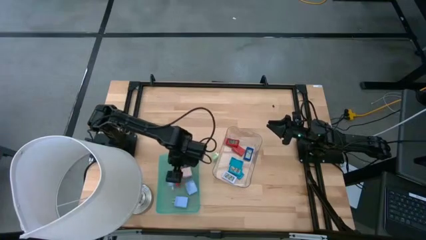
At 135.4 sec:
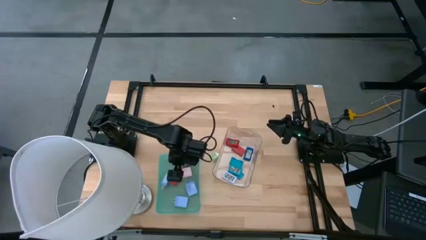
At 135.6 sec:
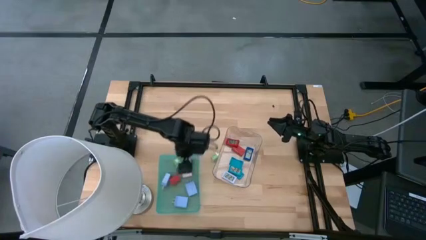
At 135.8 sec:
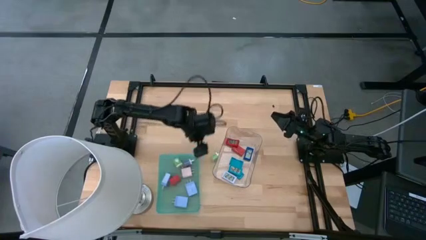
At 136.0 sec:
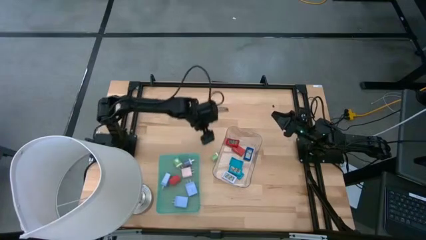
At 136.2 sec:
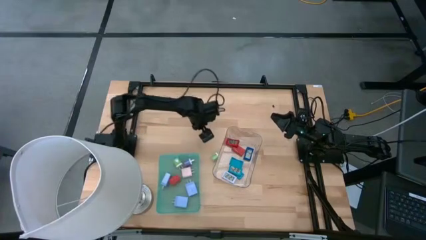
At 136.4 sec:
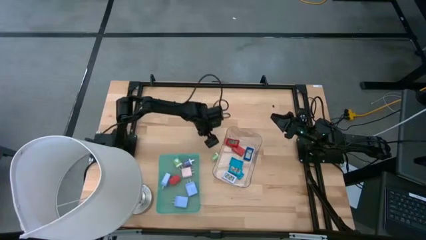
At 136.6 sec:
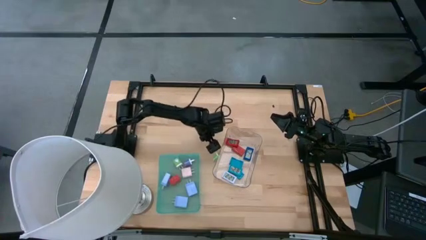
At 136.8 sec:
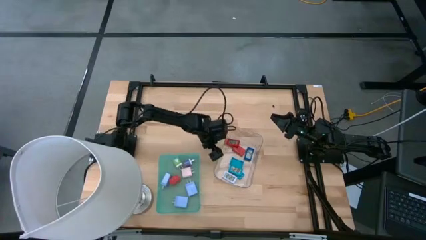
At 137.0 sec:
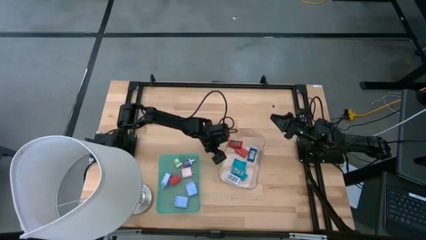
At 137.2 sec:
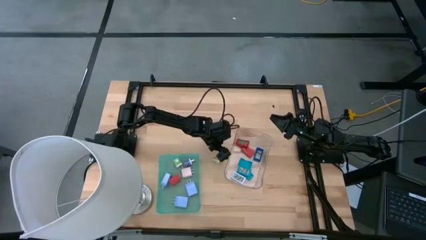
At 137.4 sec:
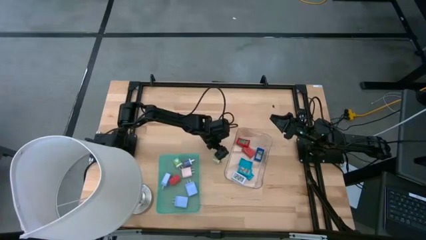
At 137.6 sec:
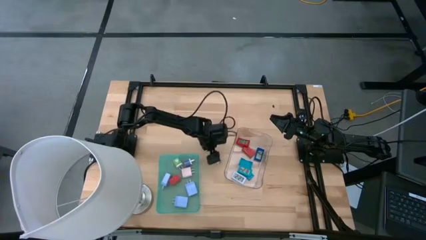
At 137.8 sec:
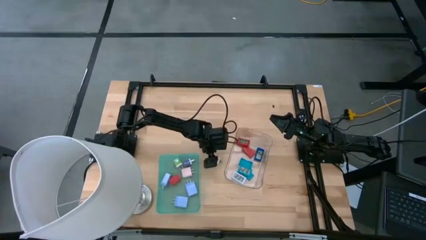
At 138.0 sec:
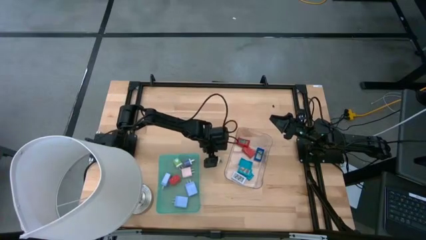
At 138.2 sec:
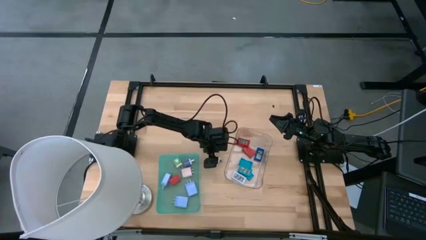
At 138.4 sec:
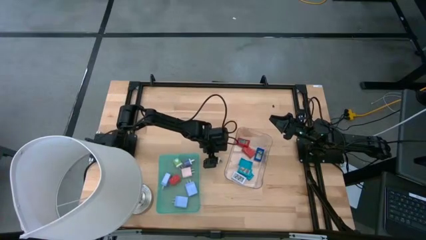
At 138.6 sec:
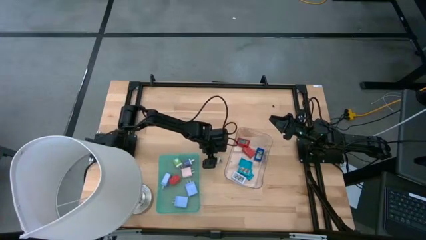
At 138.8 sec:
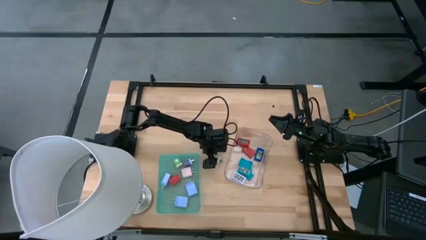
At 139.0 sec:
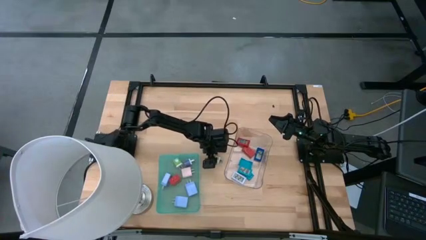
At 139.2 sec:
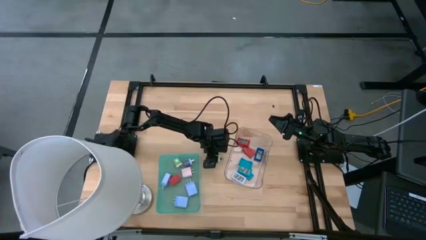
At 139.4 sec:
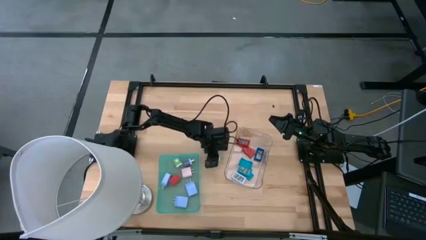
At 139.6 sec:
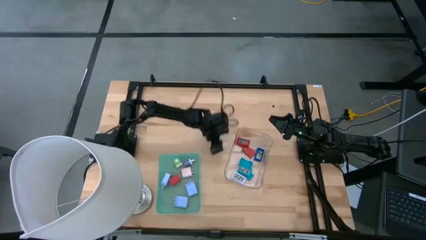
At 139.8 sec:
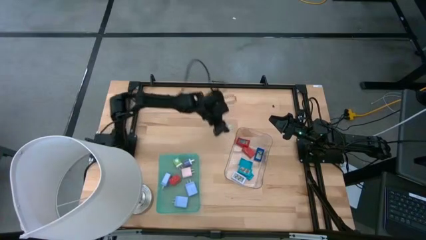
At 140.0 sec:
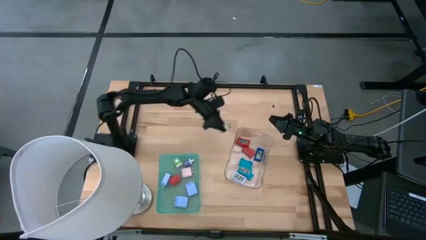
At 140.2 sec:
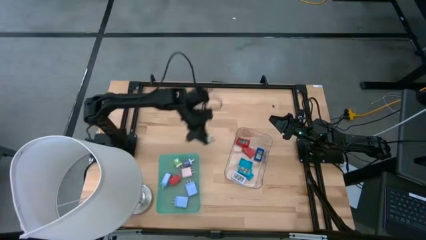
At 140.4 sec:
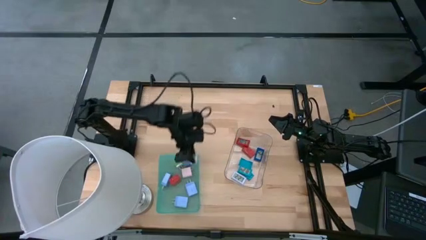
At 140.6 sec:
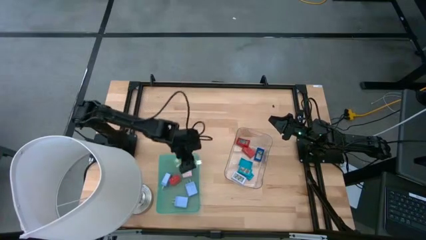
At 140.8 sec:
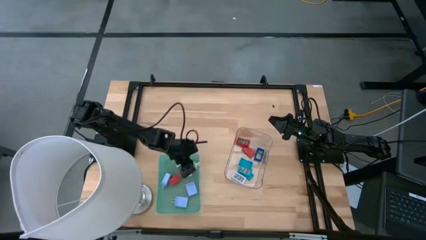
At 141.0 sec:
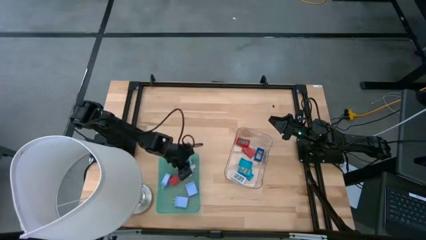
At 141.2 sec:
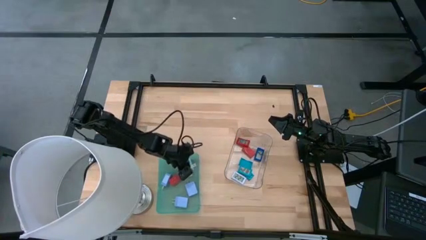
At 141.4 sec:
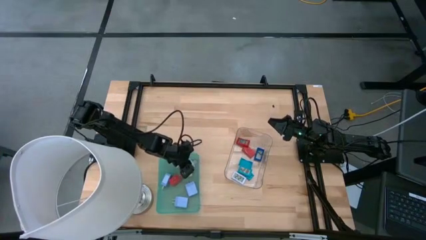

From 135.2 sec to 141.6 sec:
Task: Pick & Place Office items
Put the green charger adapter into the green bin

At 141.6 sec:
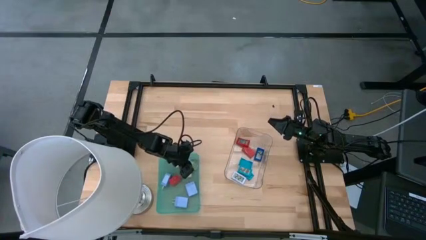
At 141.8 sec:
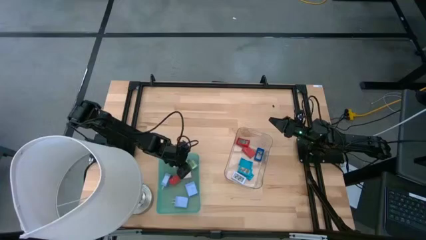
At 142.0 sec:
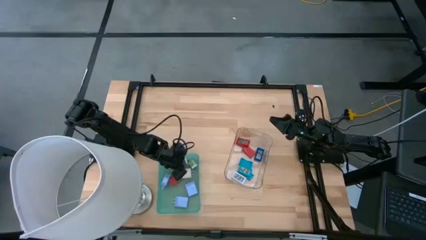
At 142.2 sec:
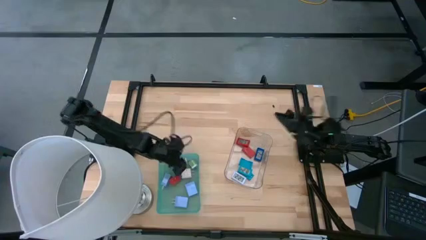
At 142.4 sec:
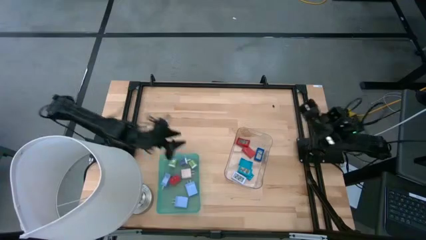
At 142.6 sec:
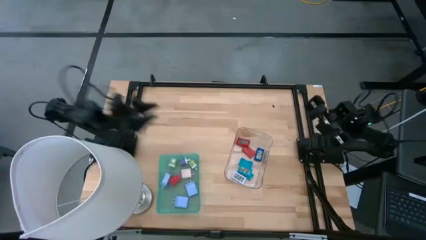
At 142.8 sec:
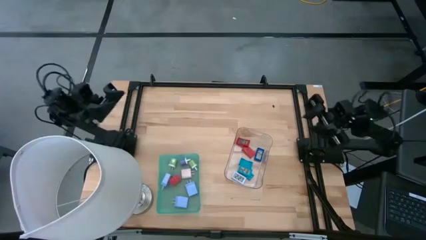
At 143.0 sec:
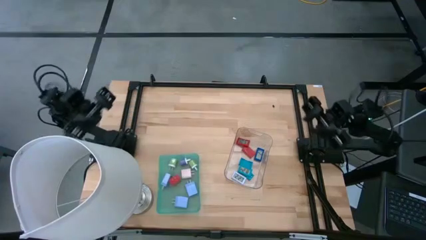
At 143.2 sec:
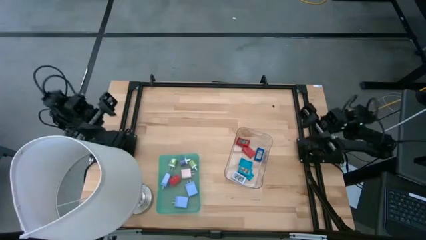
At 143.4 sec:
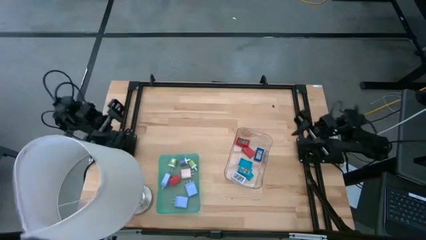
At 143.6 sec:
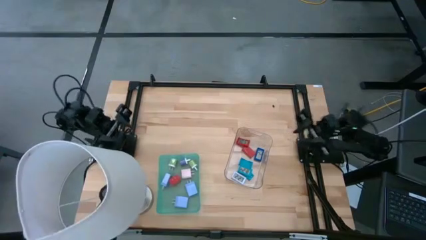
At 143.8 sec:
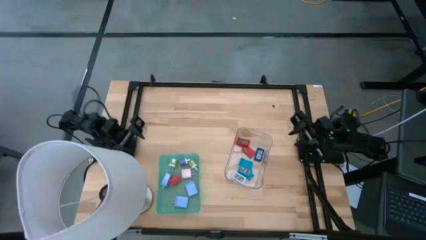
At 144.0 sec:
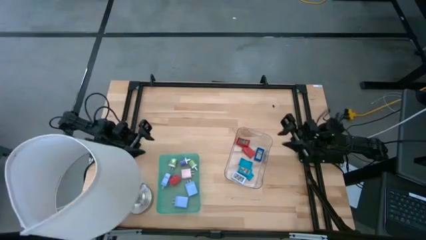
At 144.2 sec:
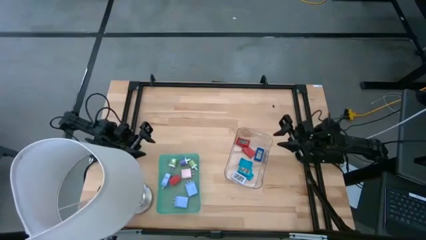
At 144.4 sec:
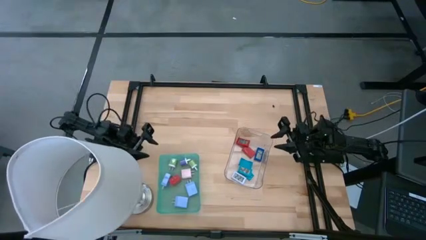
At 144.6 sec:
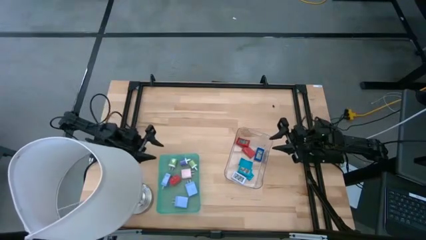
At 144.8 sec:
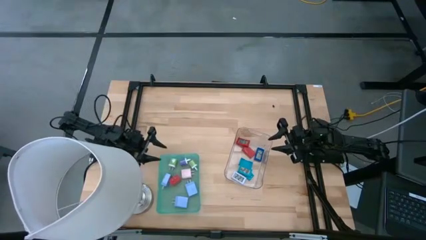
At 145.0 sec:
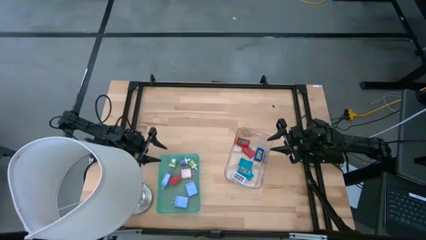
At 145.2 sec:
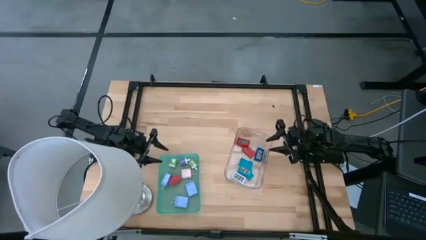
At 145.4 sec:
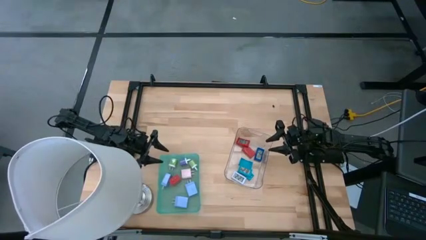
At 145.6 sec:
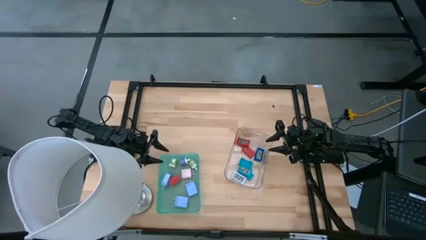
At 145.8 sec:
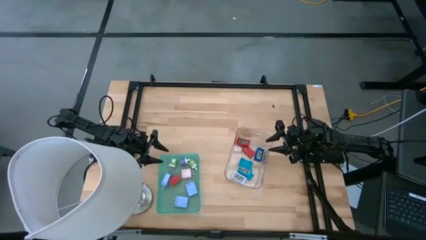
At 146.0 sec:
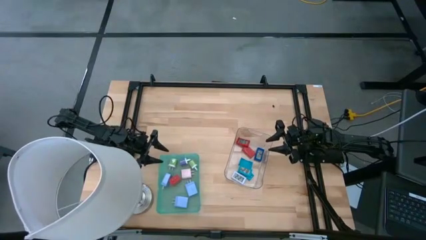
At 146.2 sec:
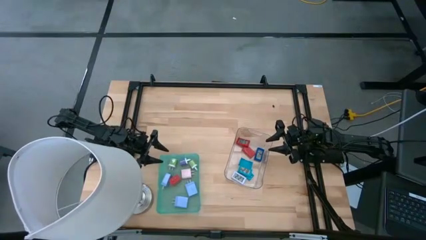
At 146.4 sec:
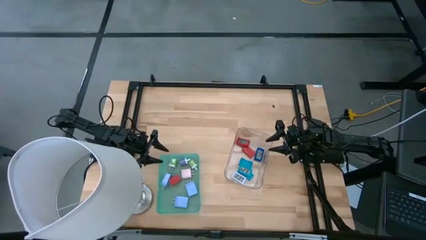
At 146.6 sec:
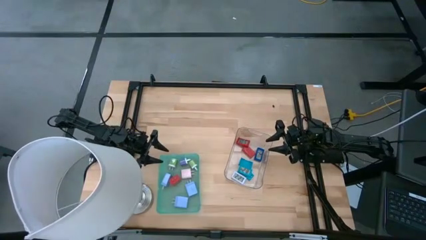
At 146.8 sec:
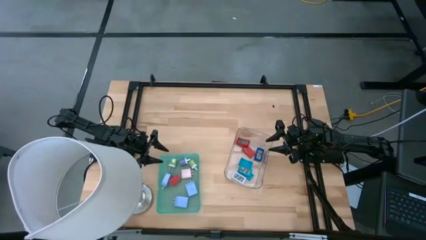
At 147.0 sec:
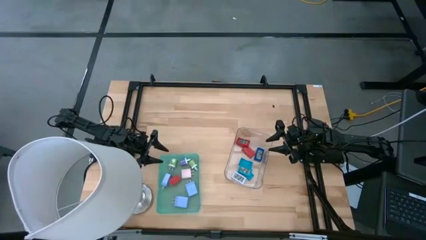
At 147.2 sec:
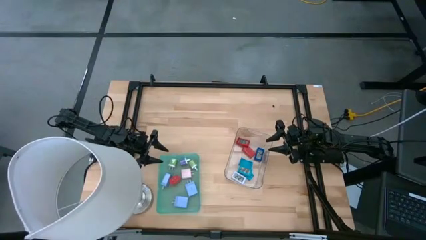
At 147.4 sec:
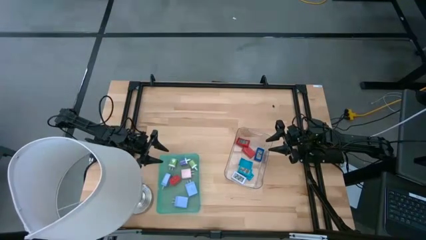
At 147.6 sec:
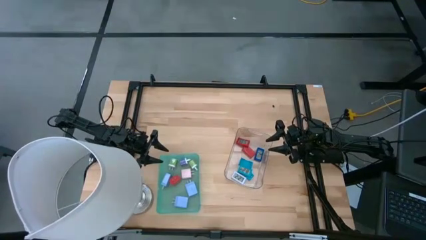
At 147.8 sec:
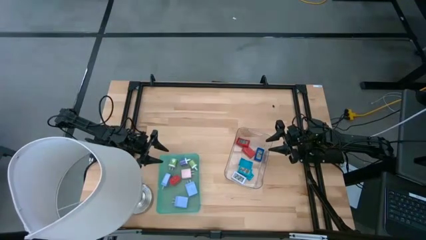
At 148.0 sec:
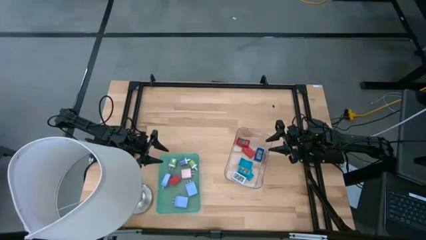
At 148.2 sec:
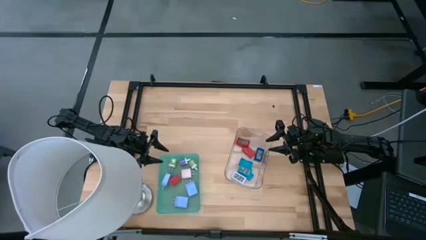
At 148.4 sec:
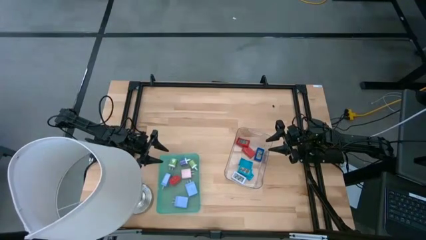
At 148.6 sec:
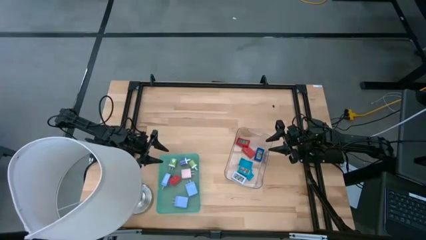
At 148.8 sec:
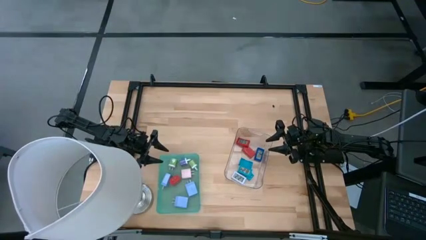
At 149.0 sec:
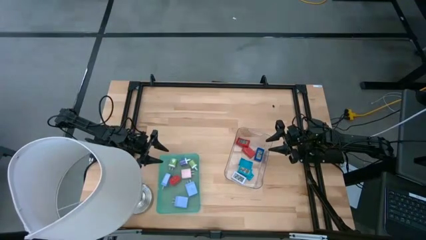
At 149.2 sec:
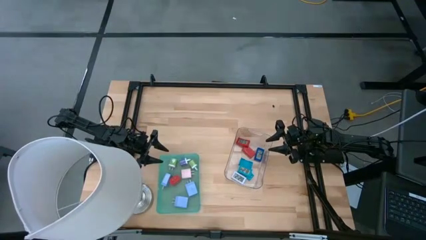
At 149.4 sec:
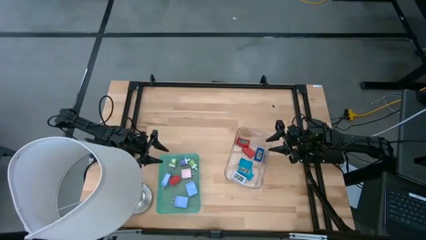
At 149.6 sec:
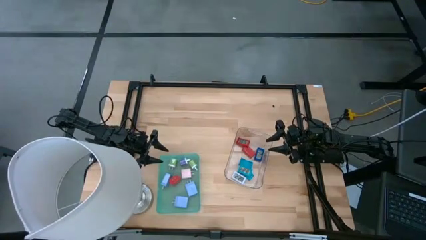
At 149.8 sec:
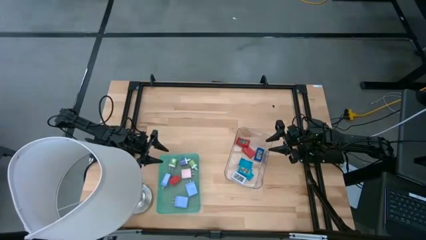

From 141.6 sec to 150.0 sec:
Return to Home Position

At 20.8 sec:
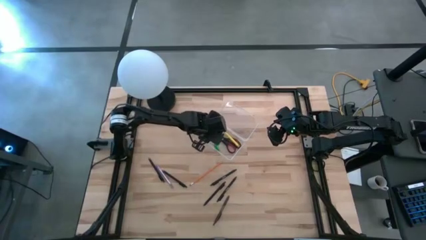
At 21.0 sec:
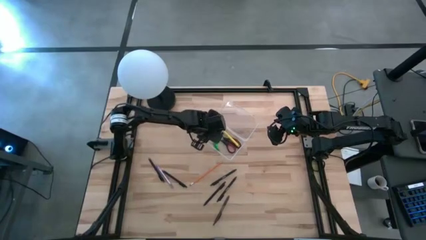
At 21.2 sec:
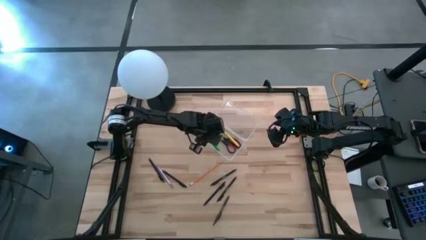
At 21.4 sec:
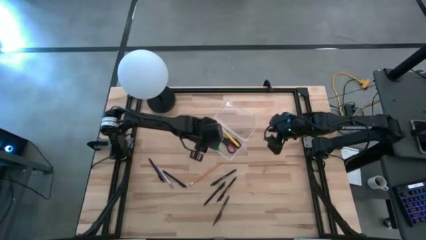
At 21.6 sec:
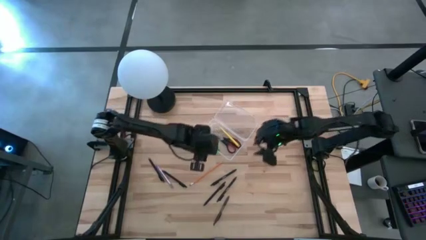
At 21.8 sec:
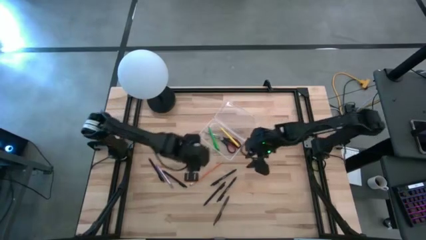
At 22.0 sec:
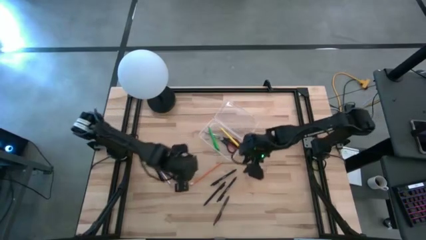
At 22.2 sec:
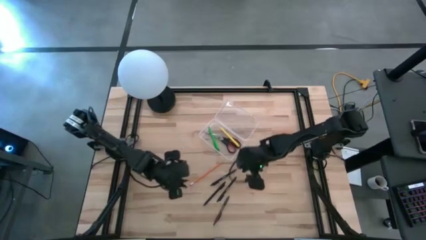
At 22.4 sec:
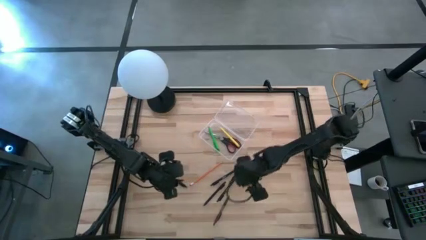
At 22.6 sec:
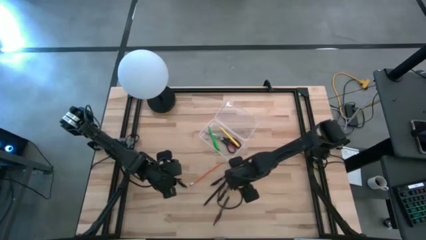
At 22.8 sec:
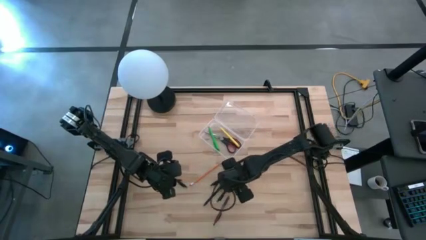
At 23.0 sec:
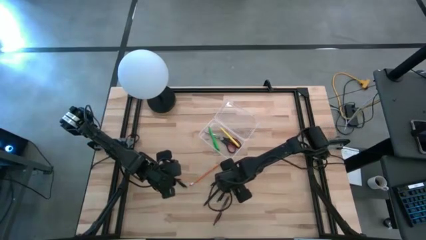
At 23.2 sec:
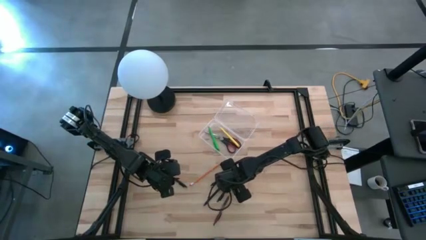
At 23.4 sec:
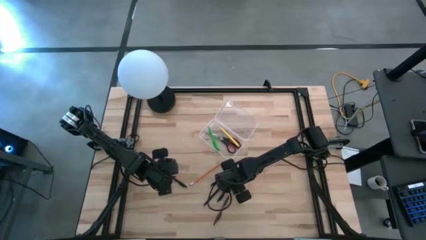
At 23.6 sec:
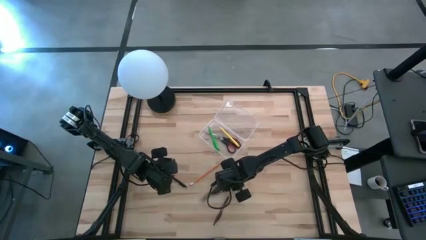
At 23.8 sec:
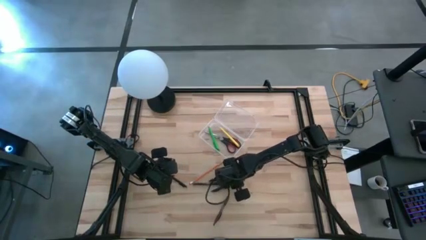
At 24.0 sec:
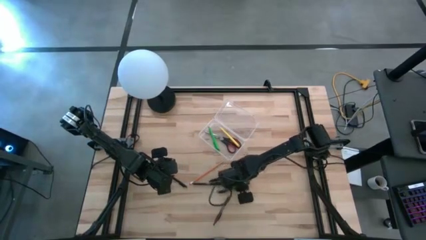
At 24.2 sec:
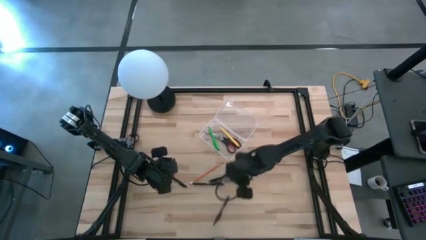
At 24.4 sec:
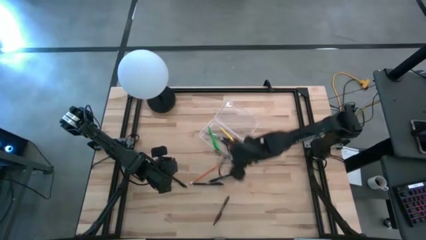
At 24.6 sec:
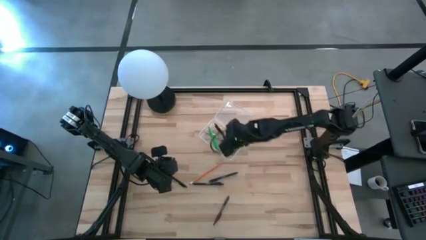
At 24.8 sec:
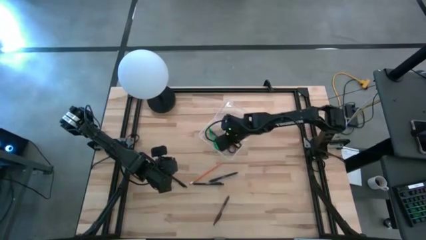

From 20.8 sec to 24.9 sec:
Task: Pick & place school supplies into a supply box
Put the black pen into the transparent supply box
